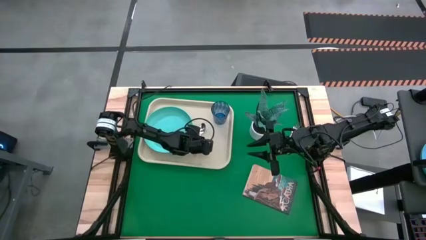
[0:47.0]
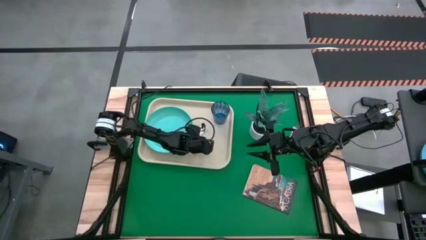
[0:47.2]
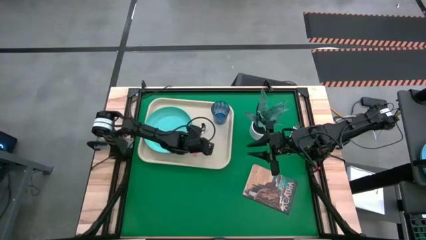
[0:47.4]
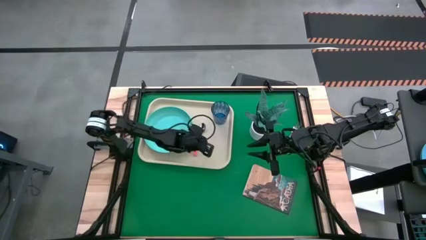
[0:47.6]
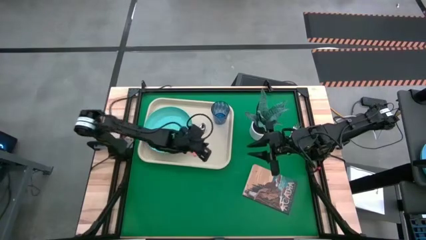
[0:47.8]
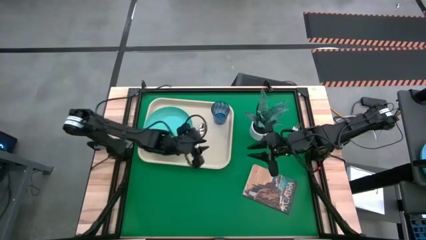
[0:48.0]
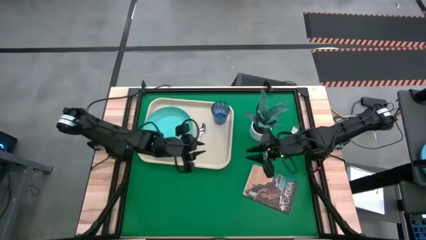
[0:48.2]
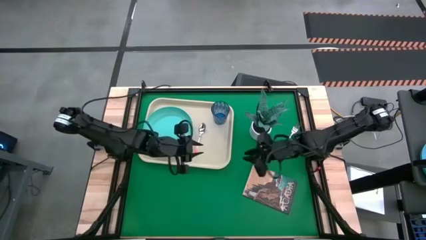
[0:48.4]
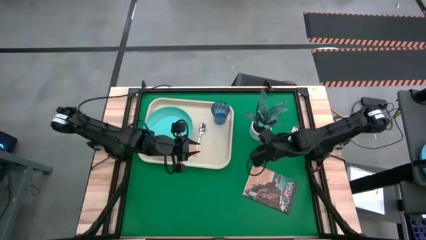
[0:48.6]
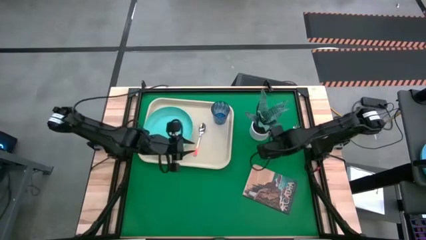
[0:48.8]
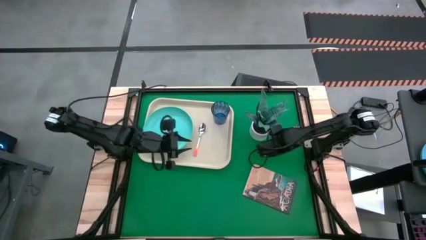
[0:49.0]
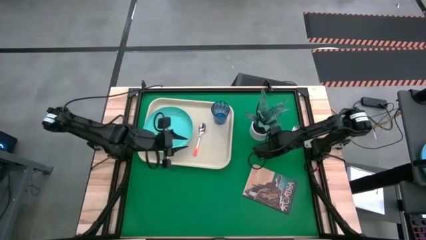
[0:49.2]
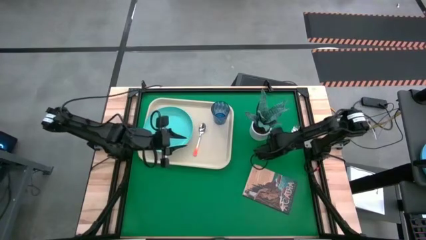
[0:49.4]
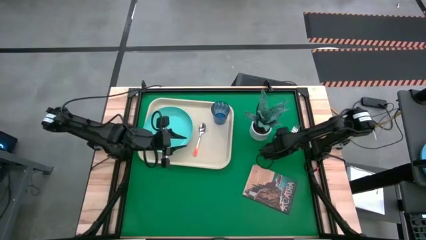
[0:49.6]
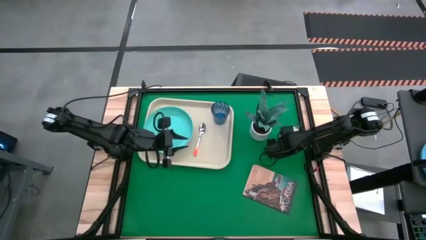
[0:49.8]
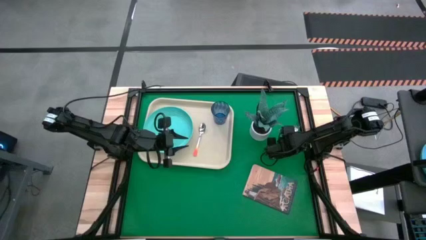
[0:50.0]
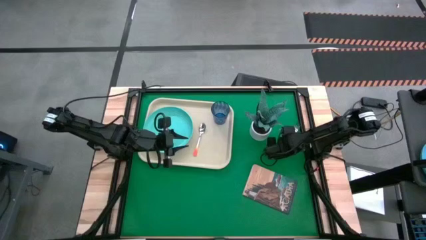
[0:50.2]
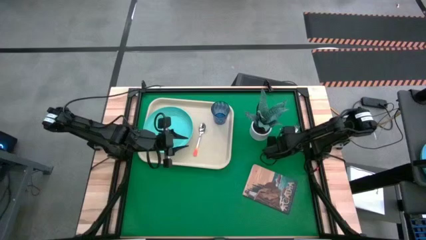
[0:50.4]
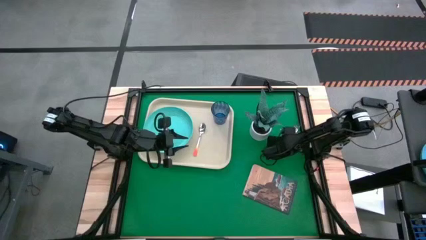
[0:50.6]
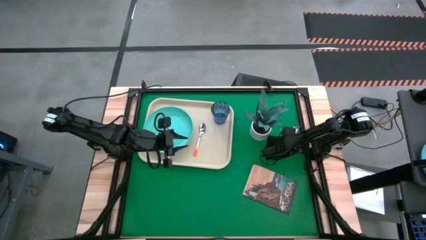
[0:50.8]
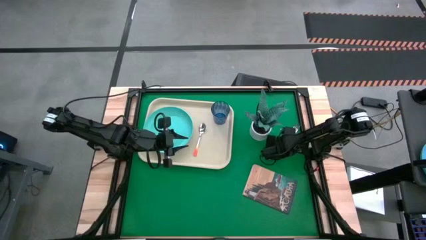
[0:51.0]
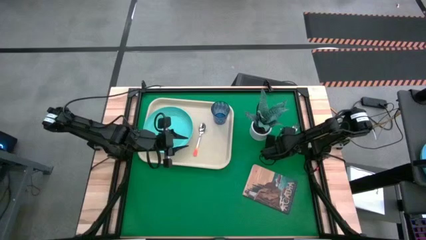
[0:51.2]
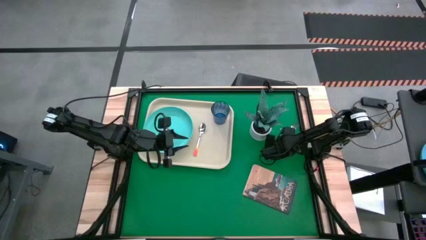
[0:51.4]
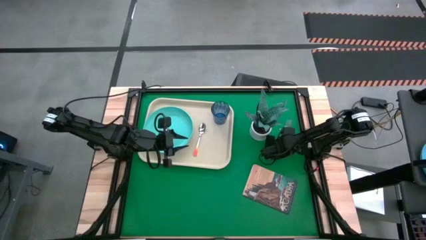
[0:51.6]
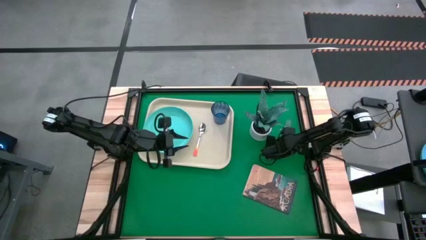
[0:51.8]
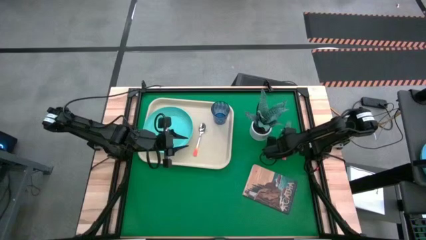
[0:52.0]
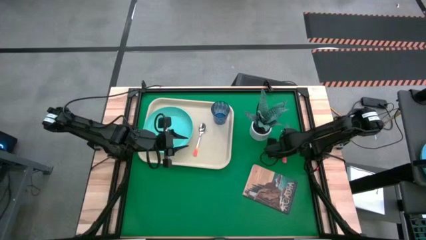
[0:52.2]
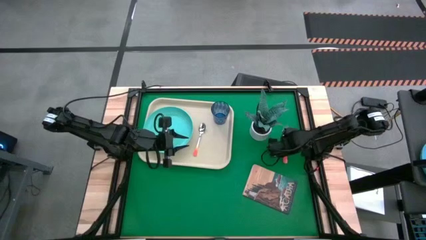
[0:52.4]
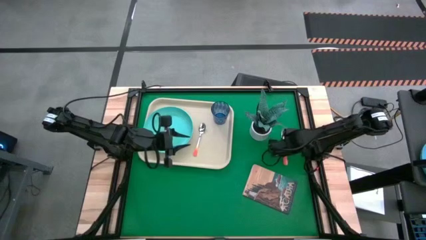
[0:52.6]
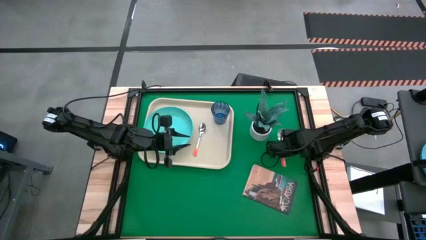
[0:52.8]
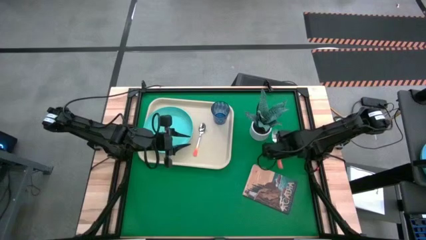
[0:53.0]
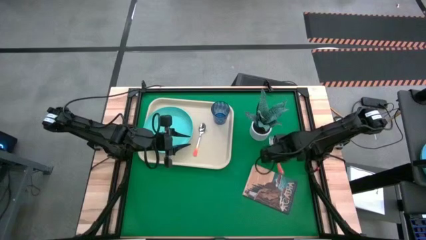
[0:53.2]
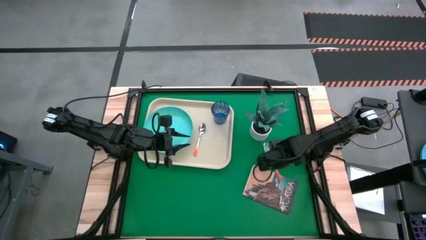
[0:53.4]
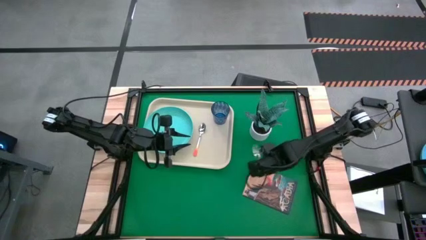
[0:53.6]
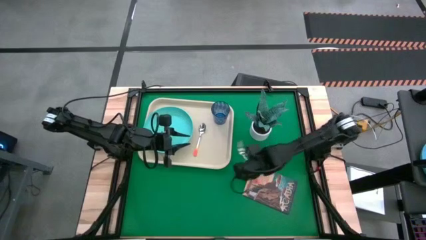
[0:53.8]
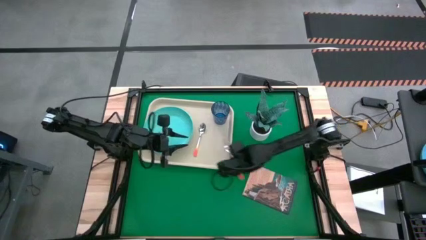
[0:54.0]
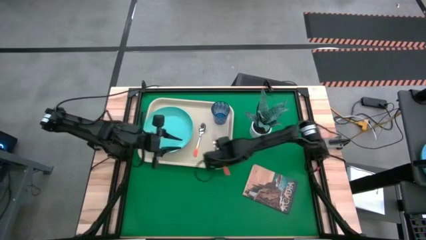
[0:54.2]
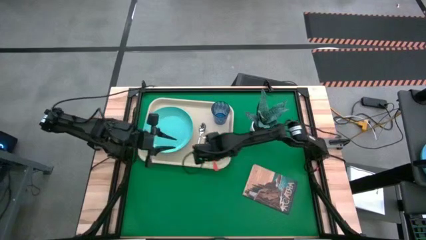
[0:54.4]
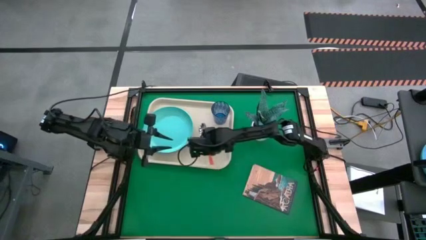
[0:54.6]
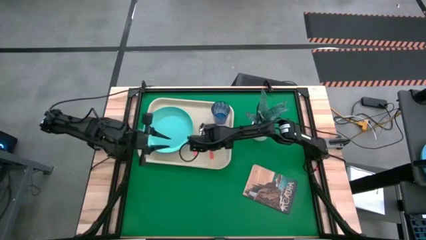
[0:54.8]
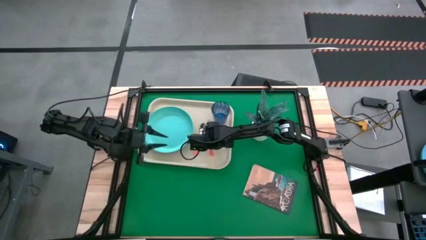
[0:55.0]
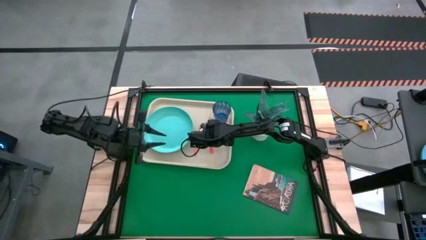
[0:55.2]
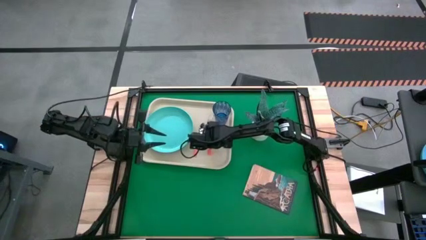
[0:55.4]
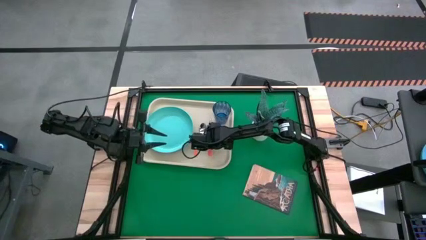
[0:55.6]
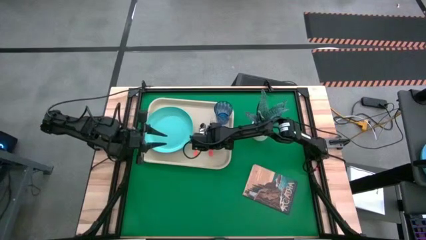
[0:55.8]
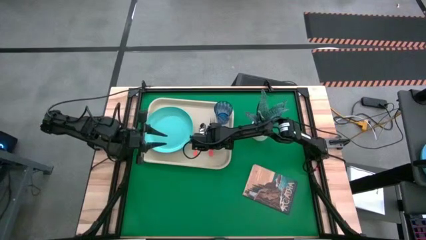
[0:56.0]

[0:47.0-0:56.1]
Task: Pick and place plate/cup/fork/spoon on tray
Put the orange fork on the gray serving tray

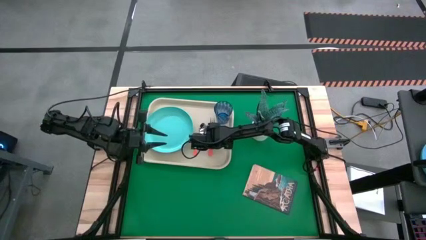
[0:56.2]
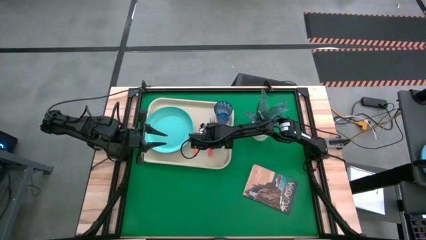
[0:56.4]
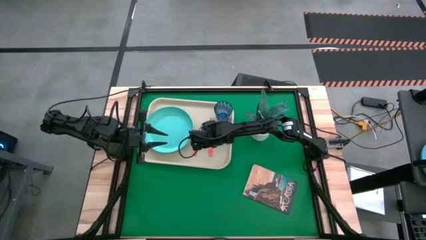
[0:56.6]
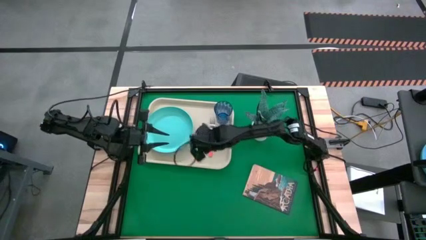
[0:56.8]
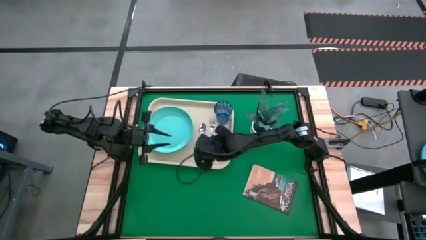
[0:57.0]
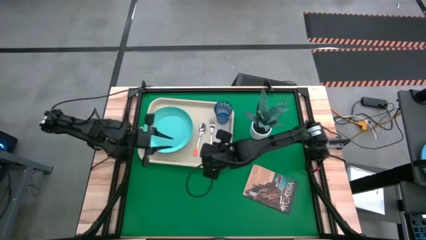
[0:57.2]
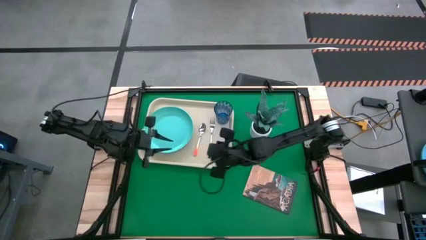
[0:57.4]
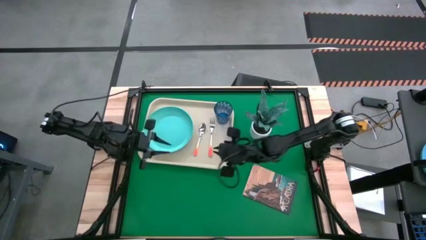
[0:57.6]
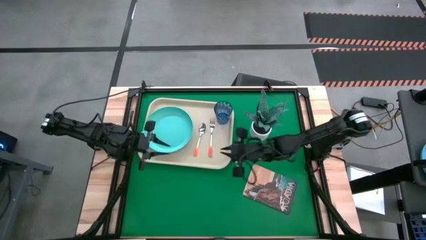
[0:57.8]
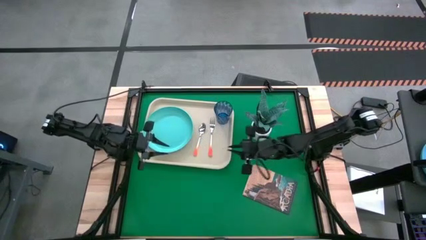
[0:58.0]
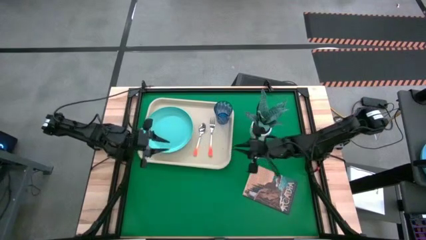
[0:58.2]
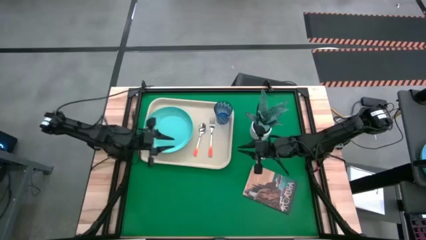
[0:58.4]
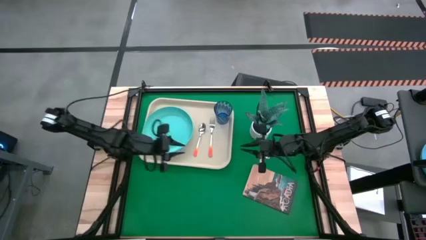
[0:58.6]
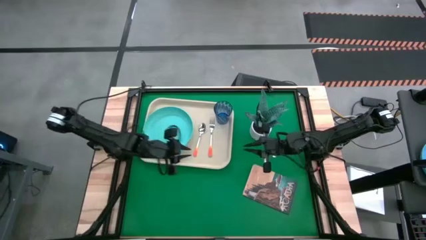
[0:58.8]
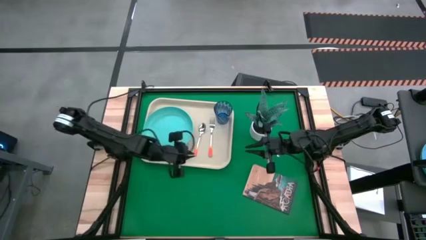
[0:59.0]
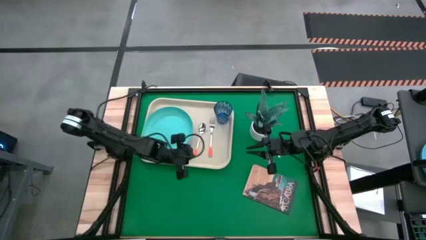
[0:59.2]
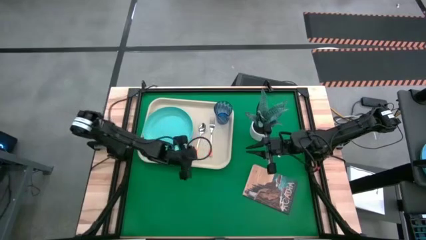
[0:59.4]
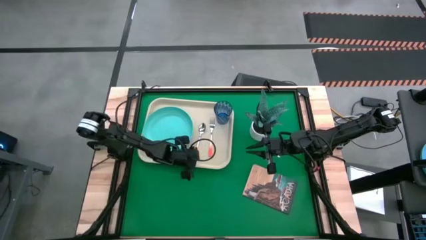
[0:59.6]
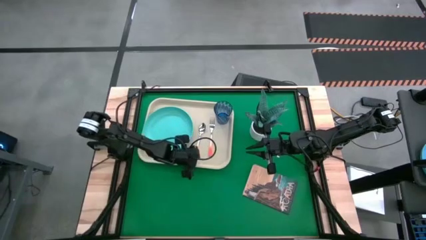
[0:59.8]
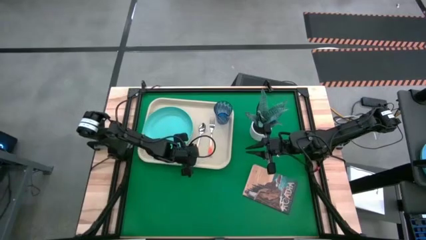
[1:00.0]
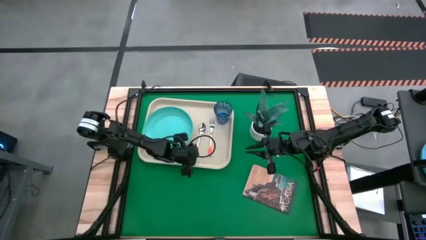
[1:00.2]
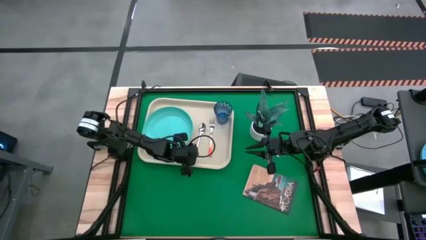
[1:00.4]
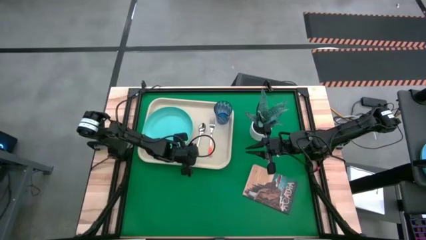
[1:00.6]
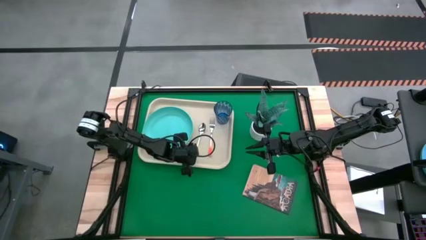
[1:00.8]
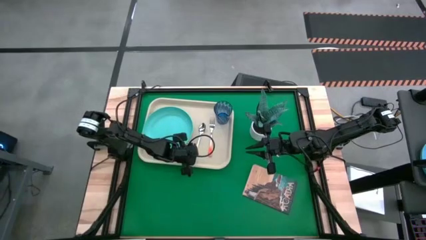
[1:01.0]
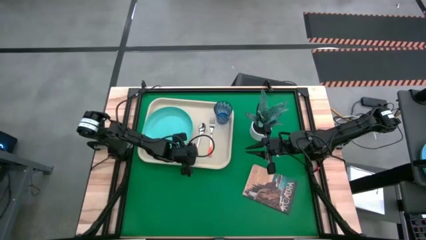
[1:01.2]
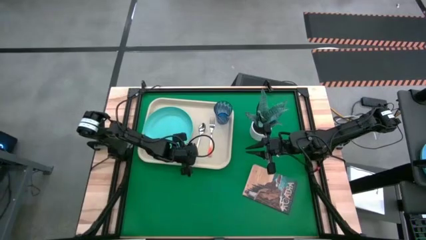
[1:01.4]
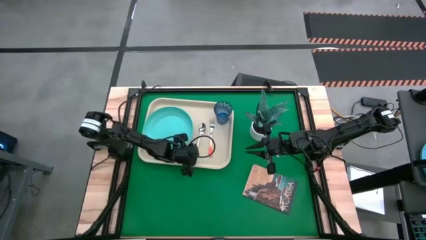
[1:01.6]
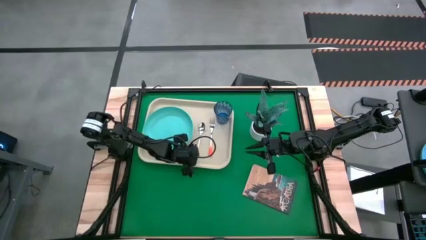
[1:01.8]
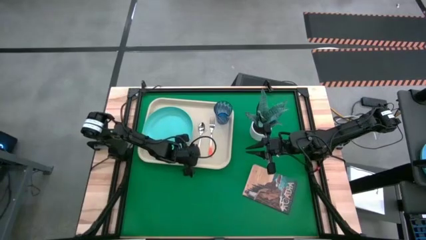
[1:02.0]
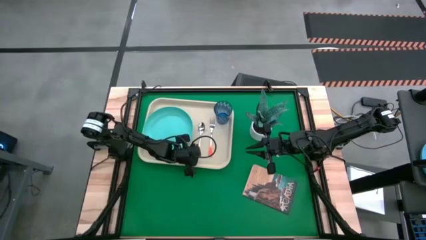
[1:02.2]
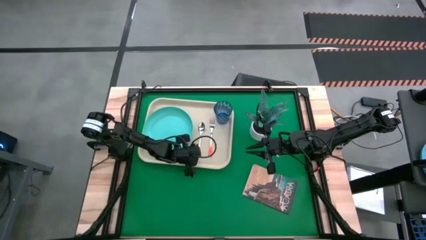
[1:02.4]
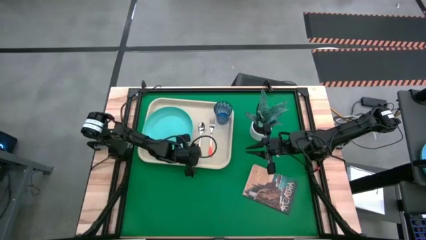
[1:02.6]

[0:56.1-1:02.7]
Adjust the orange spoon on the gray serving tray
